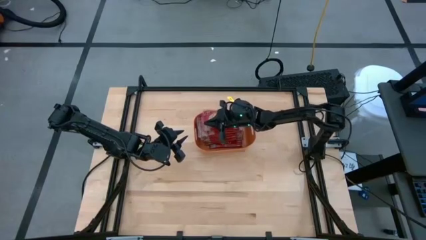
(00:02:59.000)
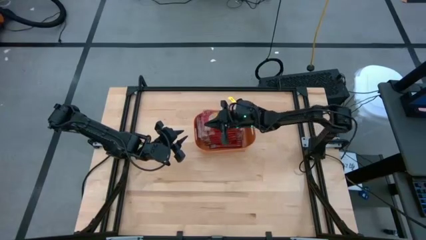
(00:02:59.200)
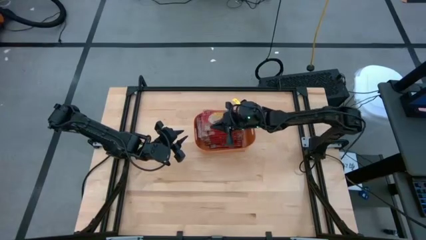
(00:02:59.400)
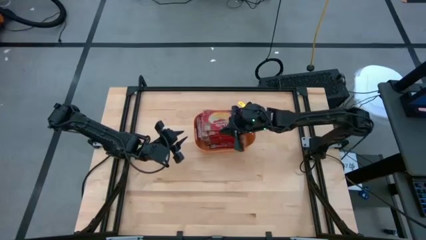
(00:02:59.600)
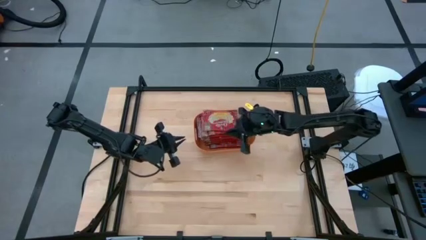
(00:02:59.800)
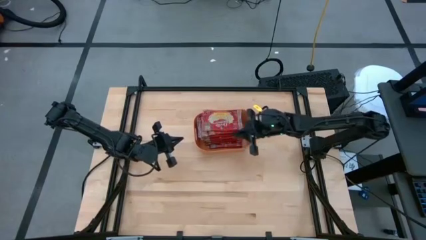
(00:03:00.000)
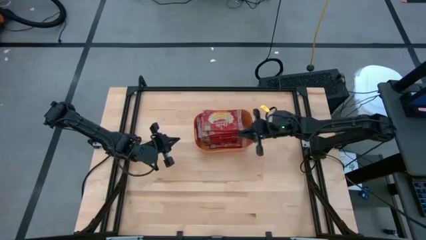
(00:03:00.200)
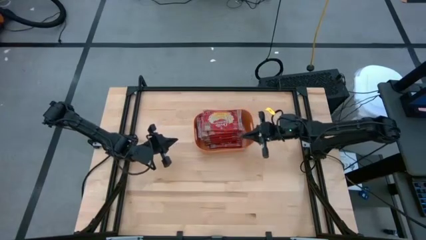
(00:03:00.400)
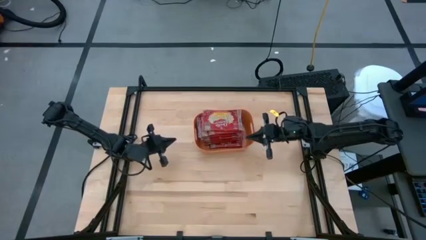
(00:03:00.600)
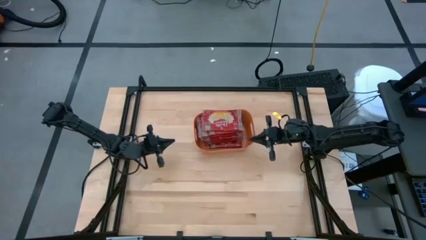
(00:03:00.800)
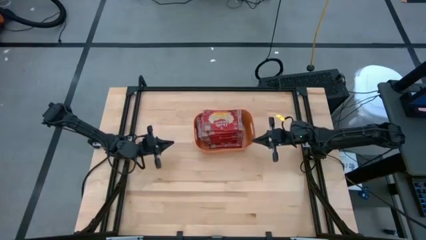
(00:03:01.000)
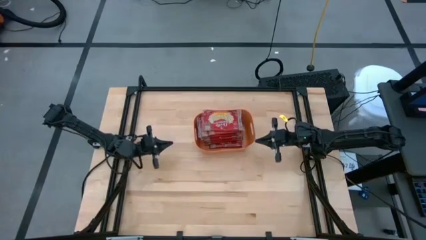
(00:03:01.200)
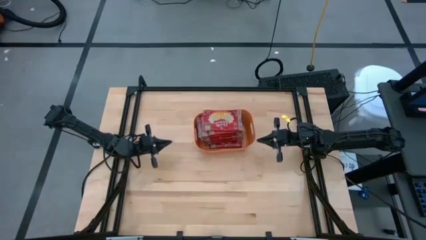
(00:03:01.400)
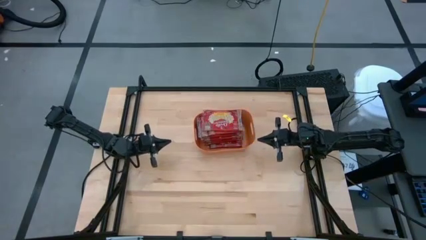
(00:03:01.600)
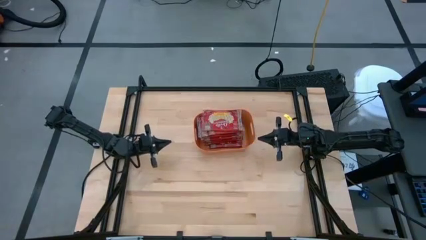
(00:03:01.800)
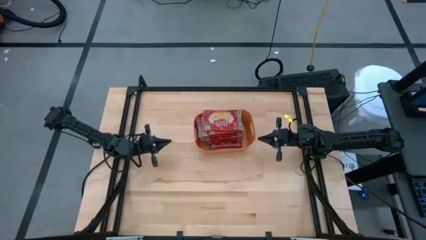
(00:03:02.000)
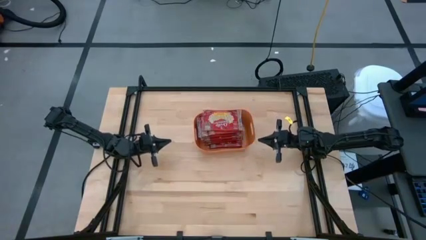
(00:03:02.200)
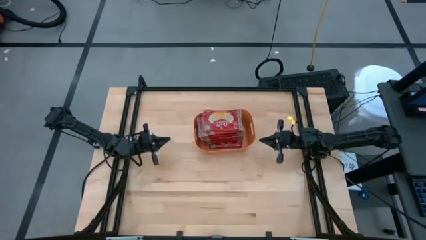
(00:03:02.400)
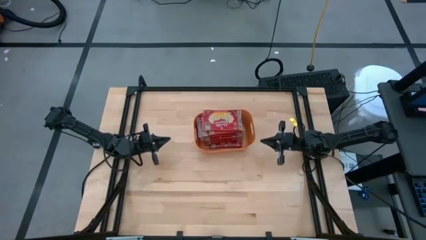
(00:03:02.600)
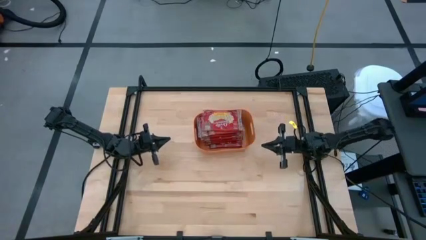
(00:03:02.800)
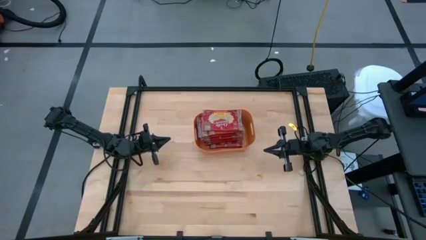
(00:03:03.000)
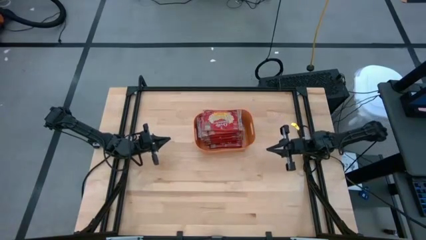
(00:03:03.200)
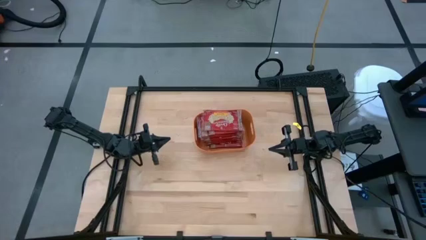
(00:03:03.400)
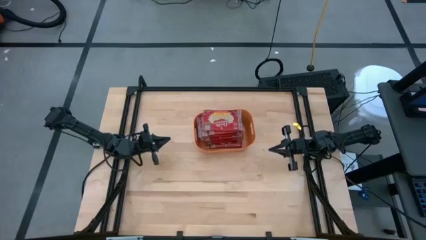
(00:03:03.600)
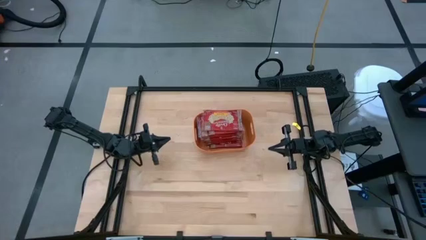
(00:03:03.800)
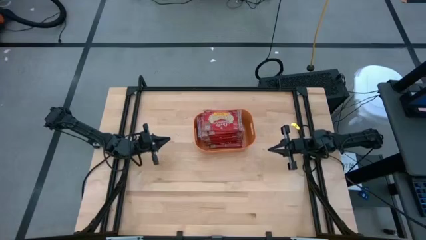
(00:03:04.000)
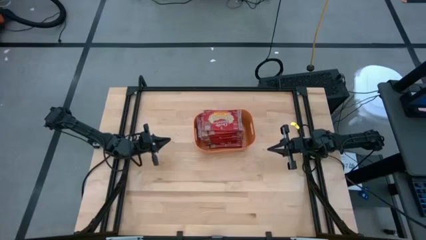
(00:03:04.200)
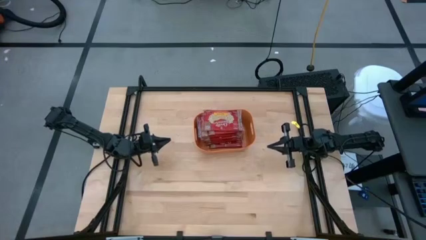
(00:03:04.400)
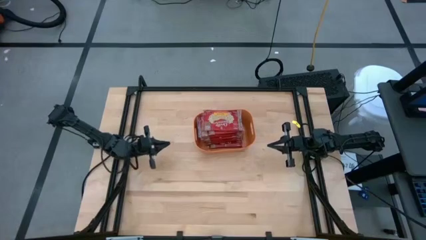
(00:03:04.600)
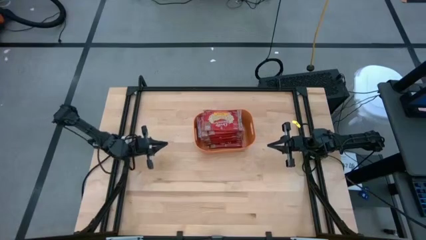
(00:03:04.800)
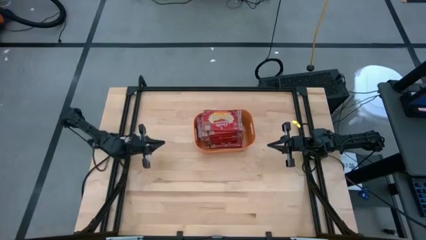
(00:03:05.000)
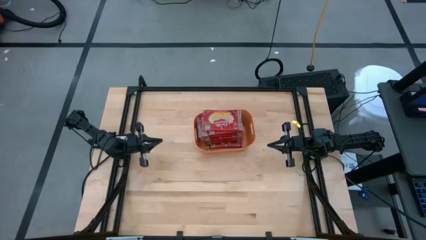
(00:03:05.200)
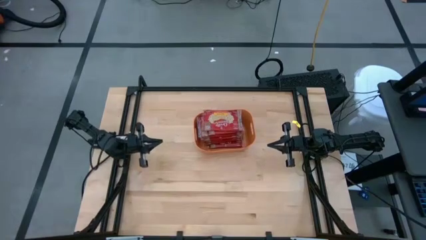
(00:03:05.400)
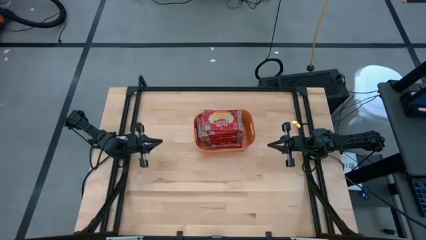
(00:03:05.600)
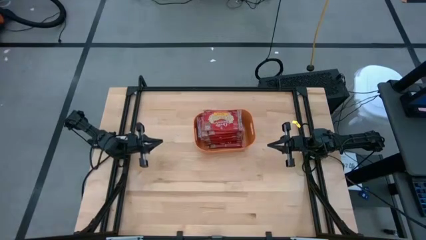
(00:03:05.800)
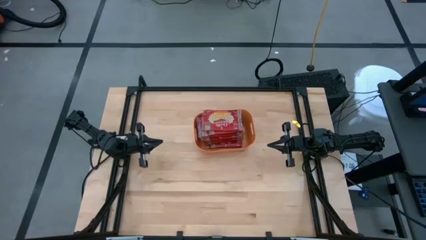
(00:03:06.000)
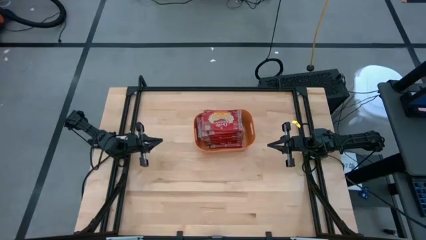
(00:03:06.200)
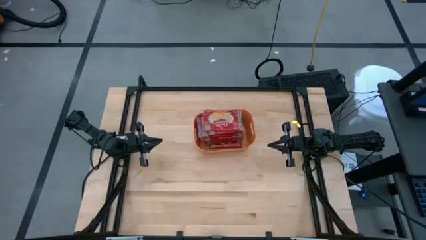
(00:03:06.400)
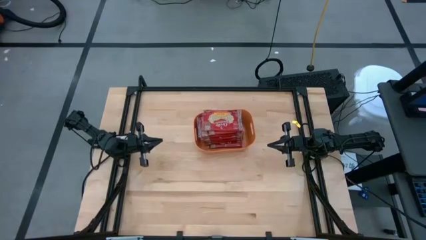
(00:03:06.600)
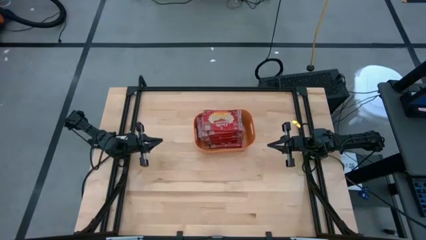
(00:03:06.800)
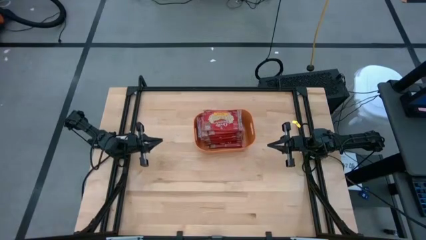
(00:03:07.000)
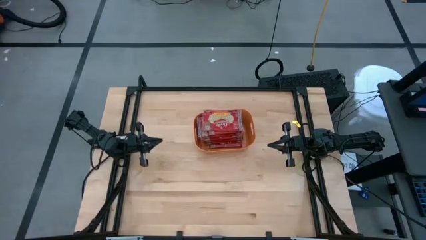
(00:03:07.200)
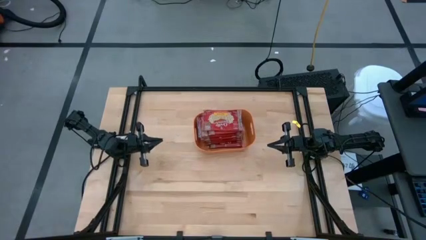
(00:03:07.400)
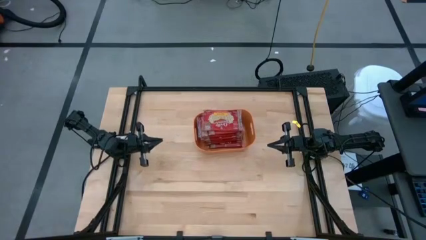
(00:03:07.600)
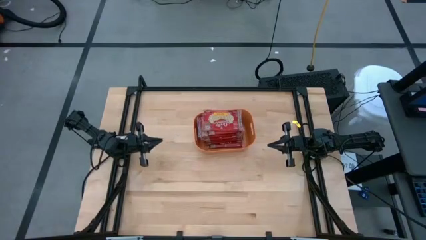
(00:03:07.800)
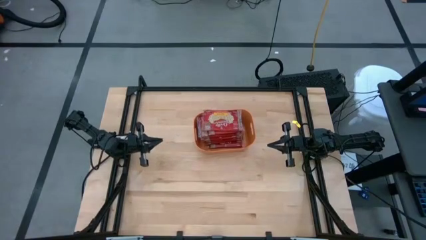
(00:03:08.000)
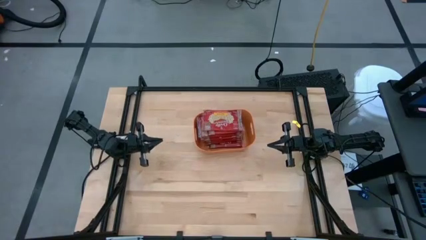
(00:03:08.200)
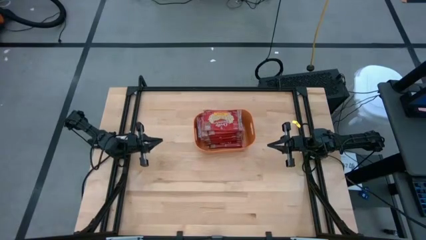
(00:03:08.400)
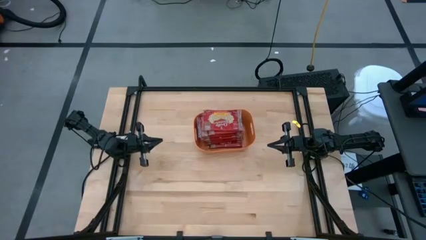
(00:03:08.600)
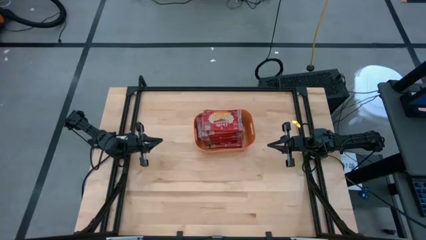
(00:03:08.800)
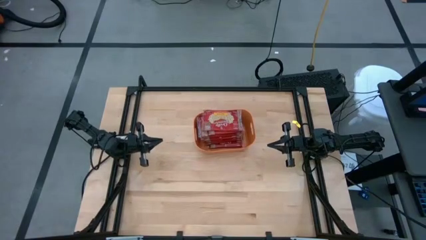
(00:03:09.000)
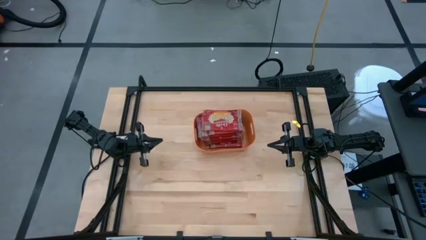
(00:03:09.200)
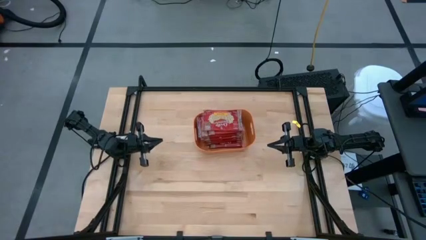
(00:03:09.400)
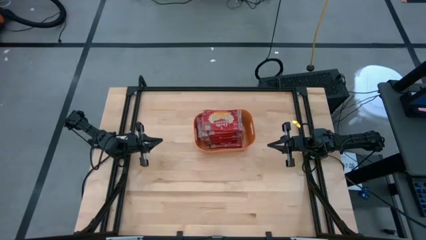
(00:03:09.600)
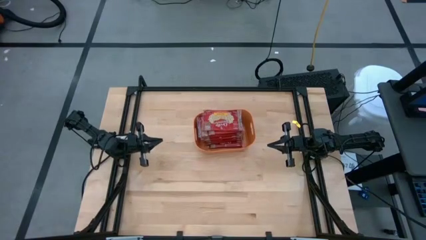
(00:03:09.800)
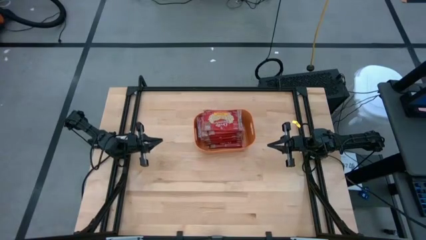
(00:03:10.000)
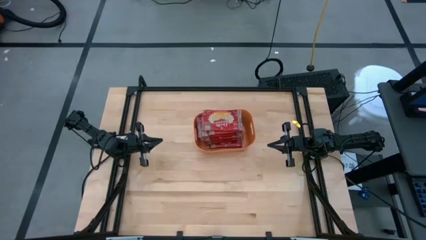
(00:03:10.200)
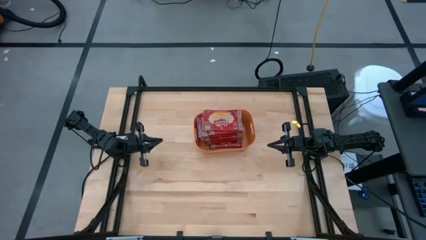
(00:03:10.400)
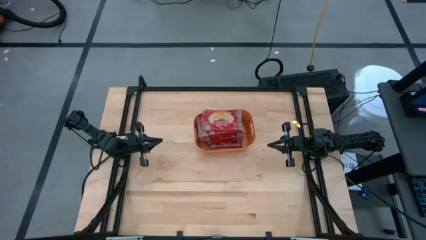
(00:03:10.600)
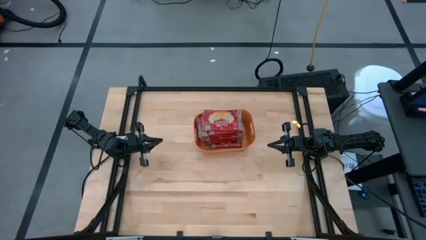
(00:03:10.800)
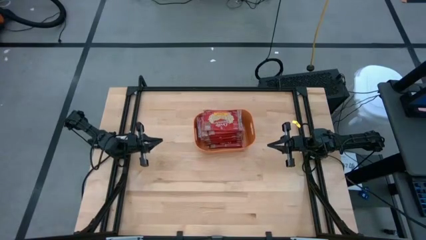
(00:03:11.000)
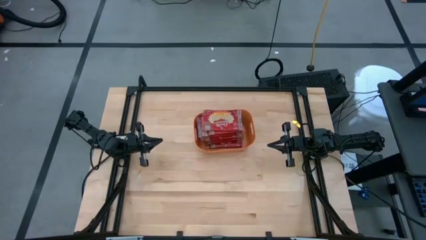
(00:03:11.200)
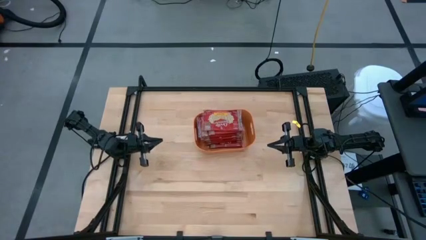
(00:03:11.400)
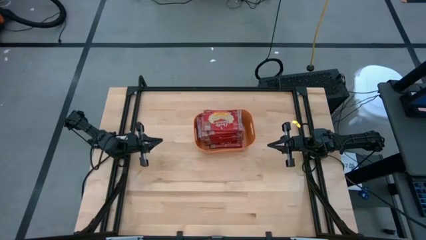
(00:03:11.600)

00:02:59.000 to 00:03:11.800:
Task: Sort popcorn bags into baskets
Return to home position
